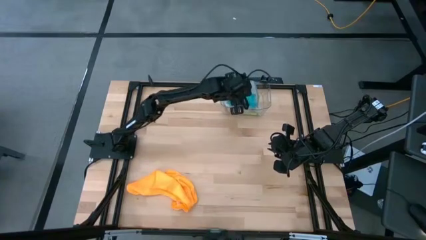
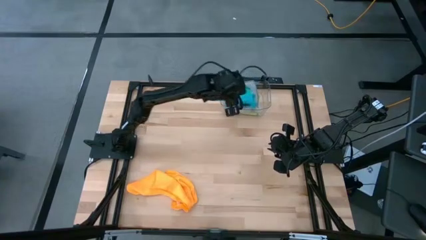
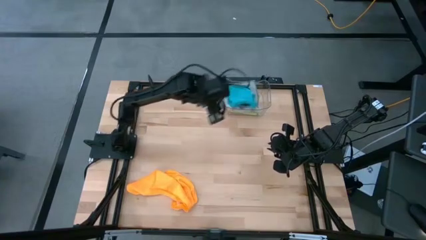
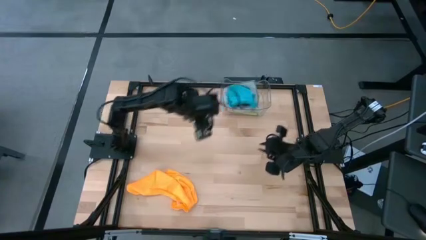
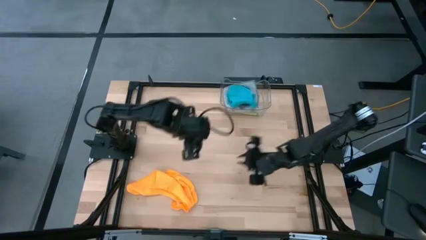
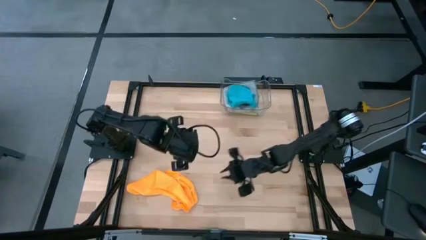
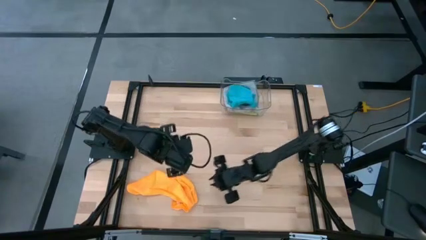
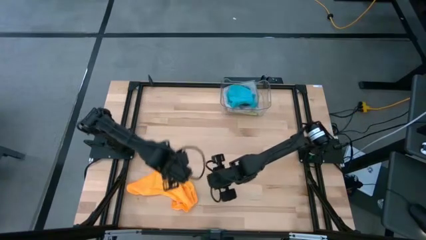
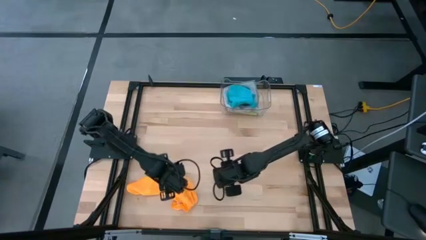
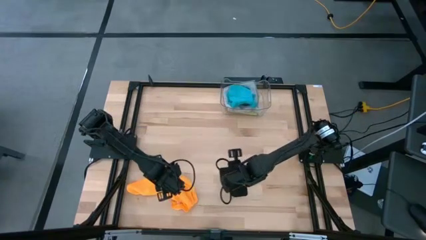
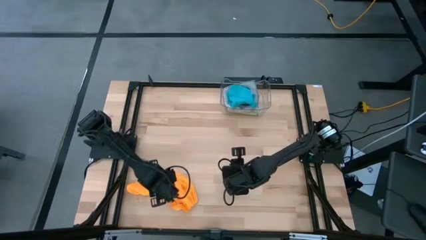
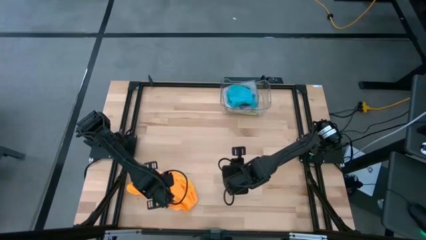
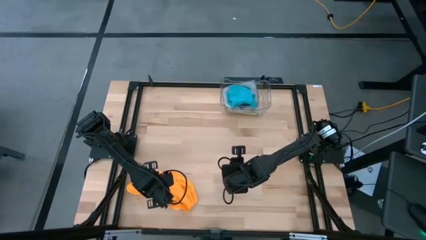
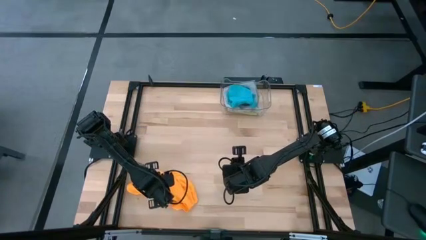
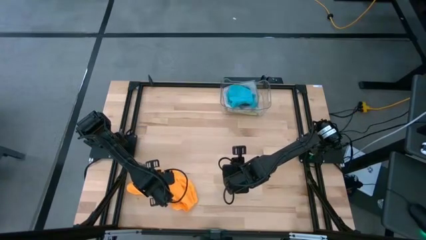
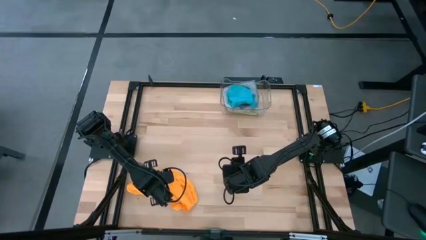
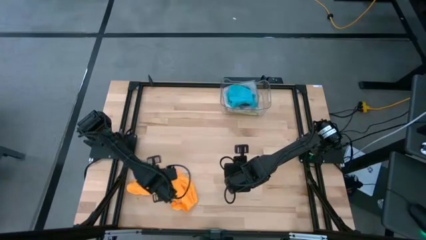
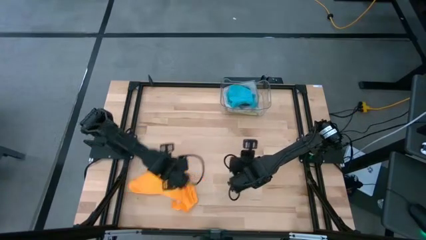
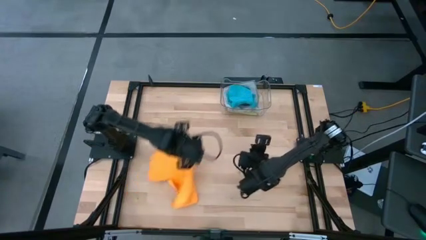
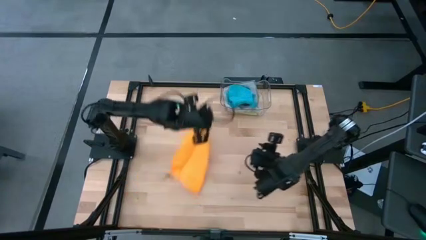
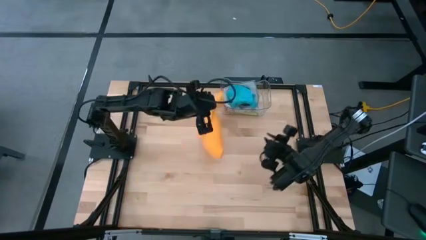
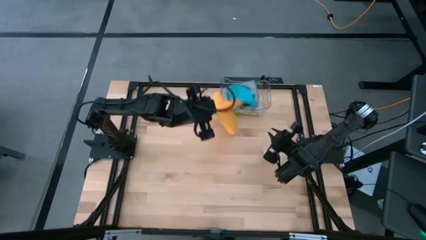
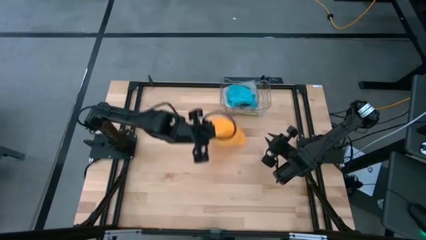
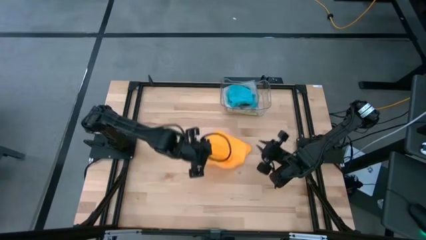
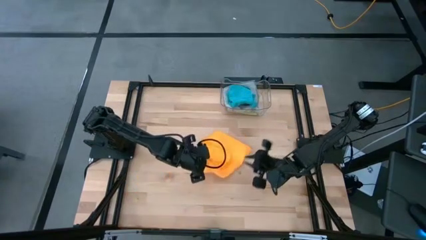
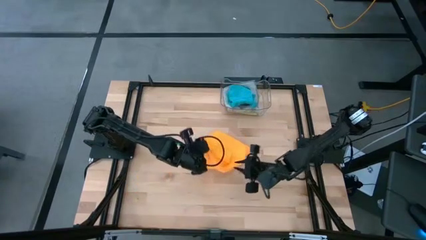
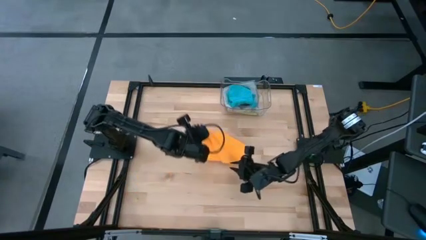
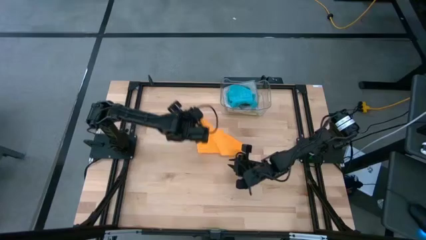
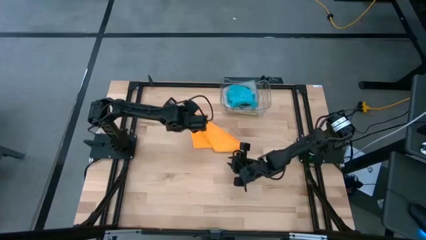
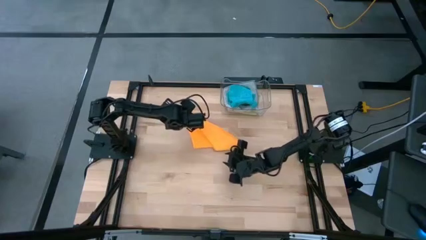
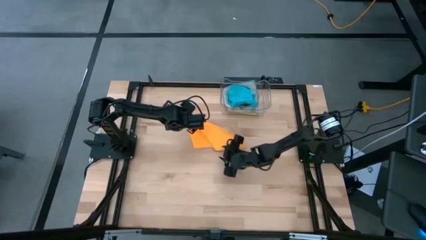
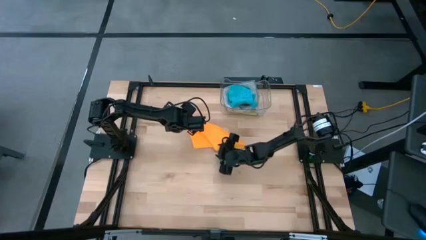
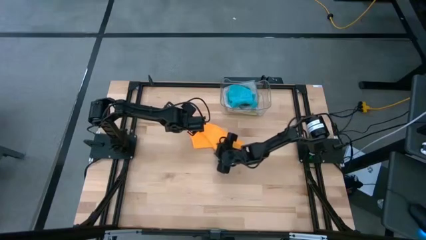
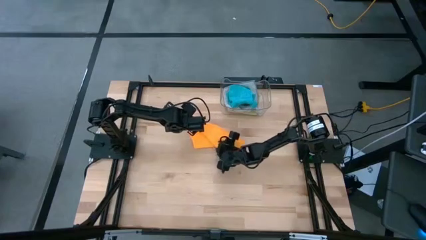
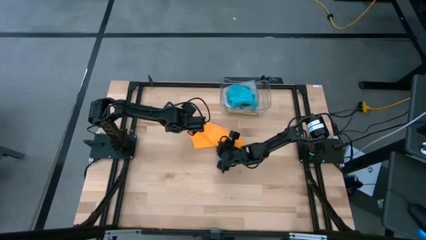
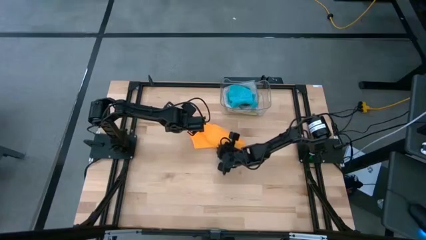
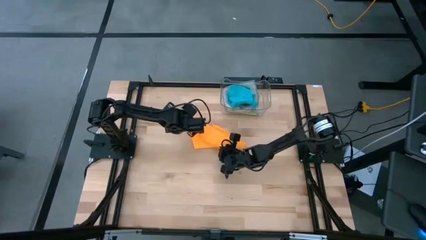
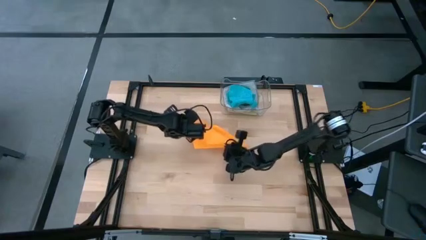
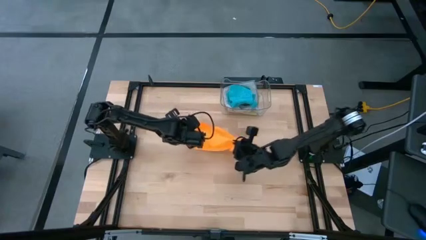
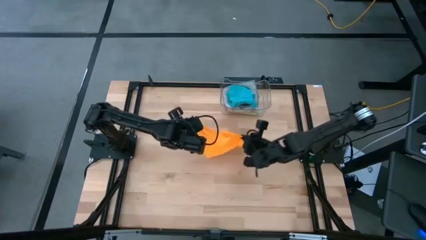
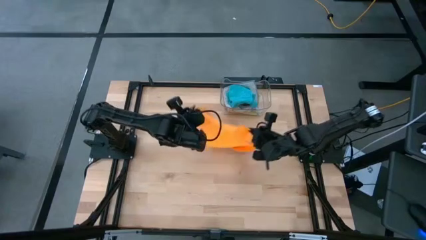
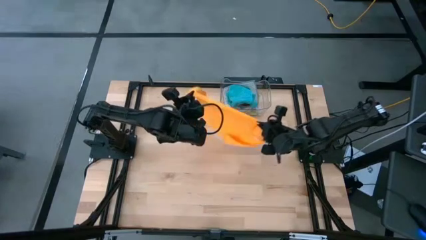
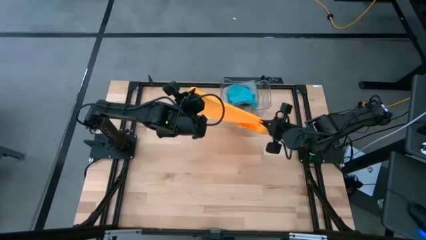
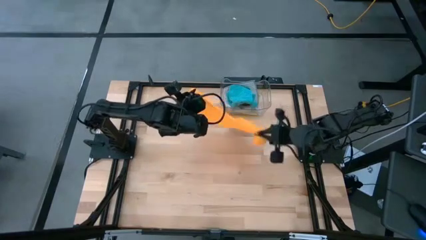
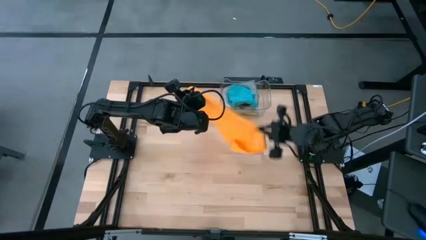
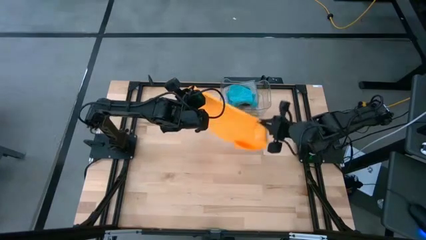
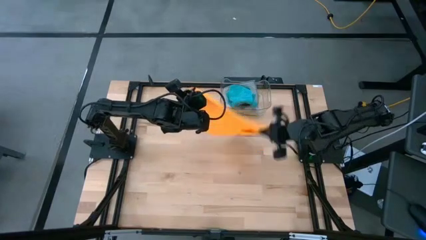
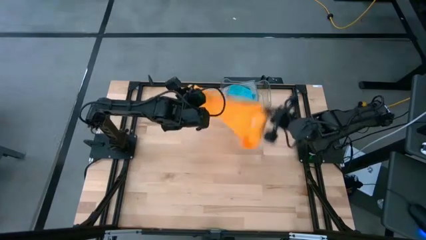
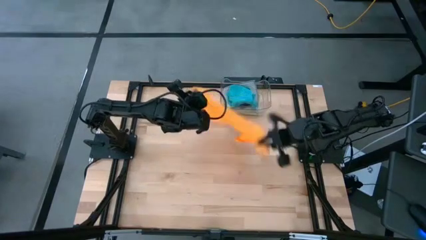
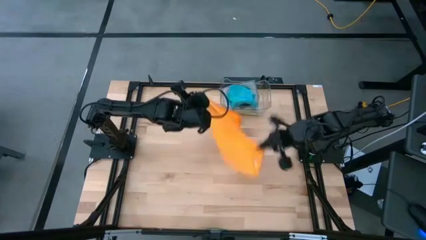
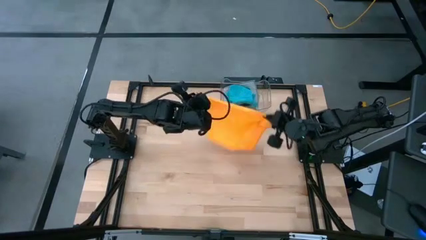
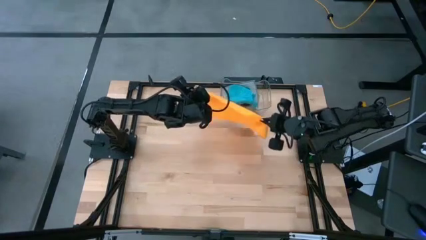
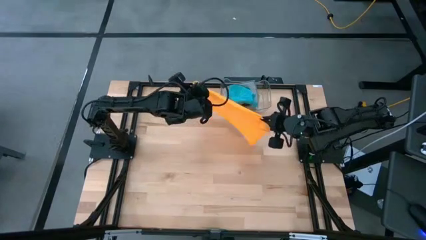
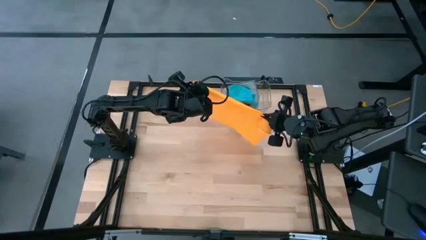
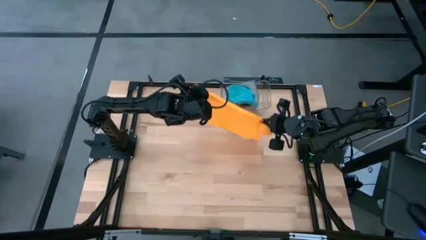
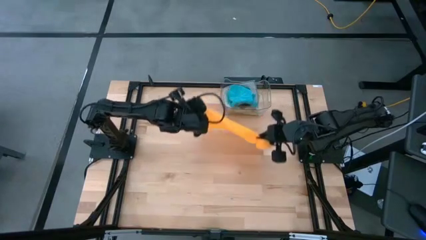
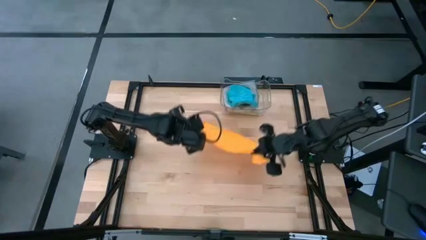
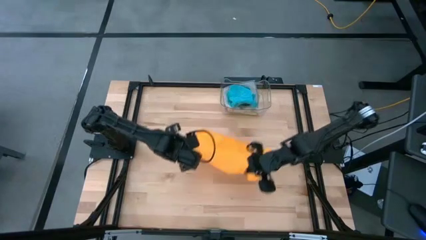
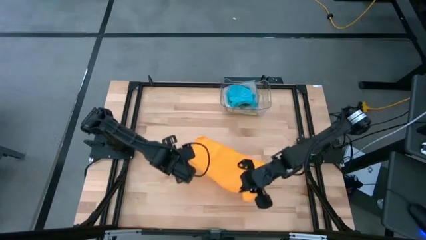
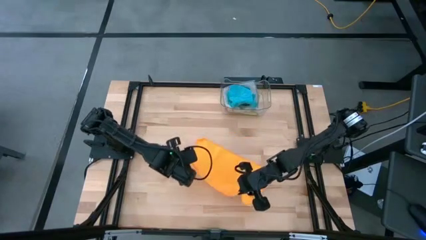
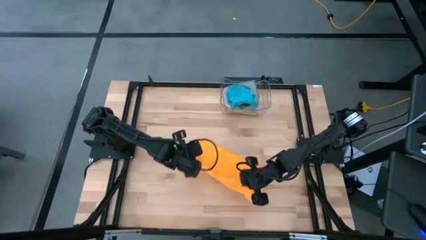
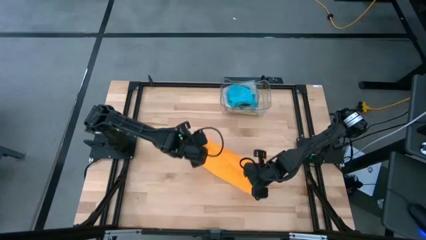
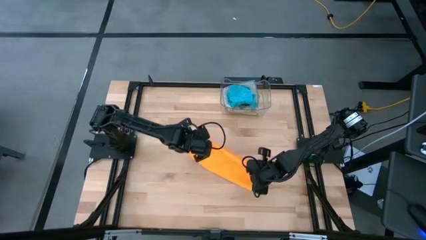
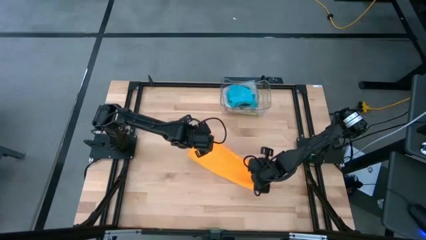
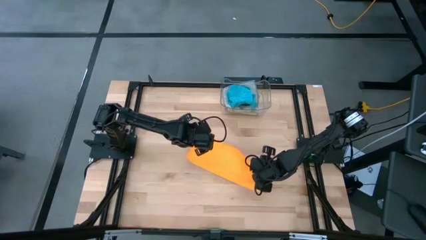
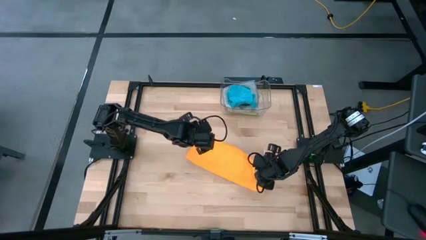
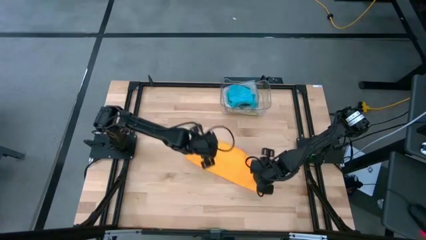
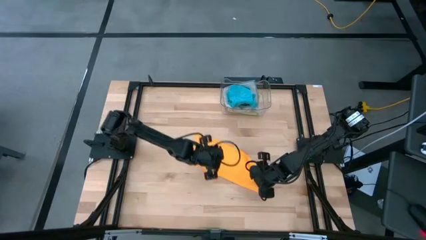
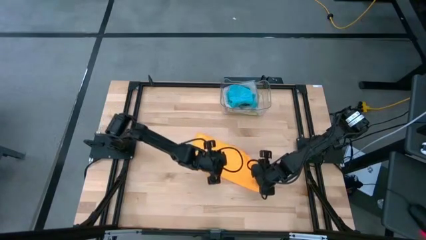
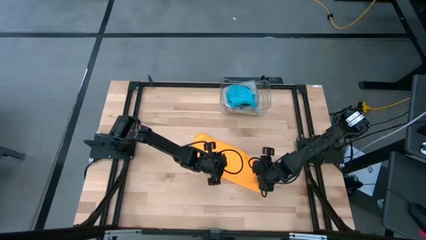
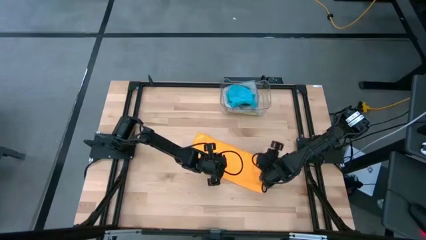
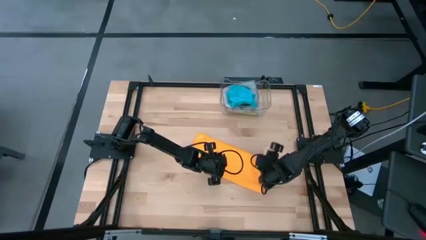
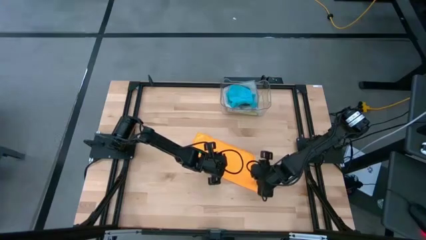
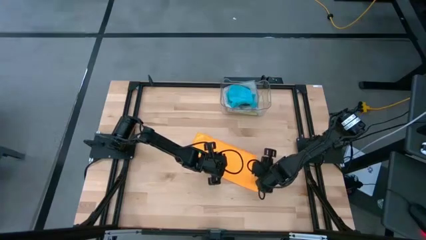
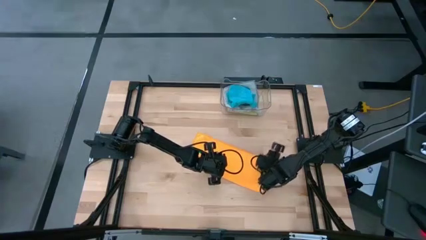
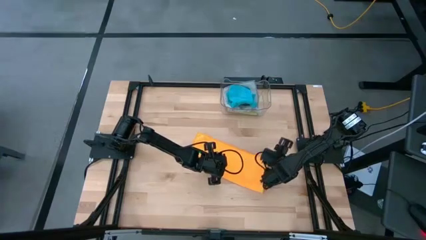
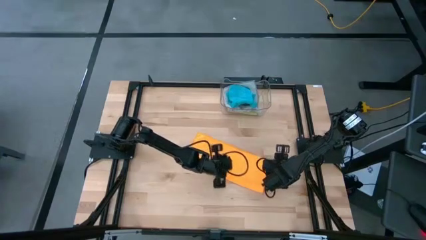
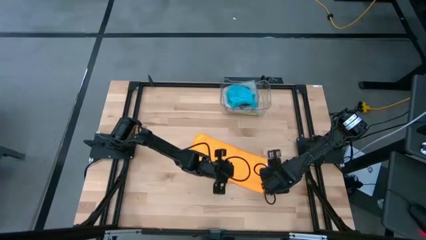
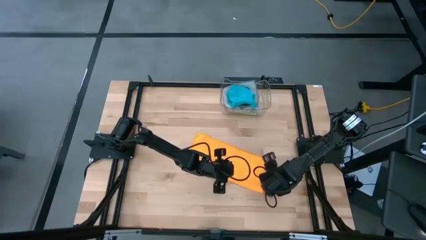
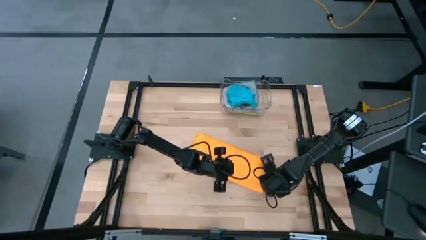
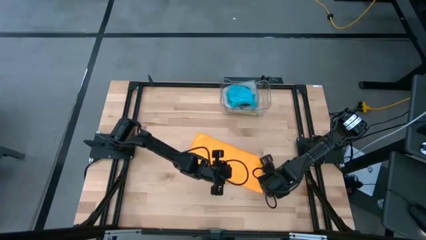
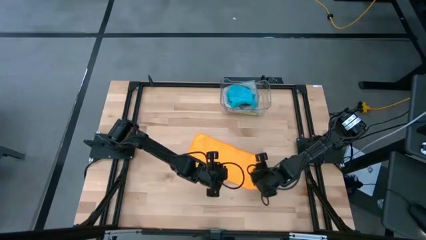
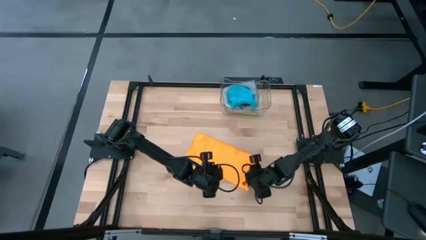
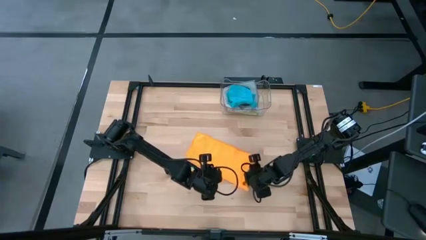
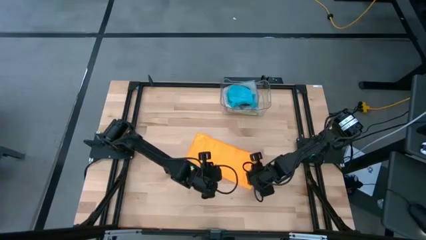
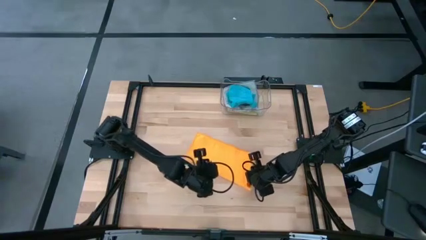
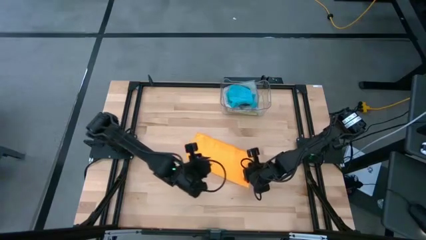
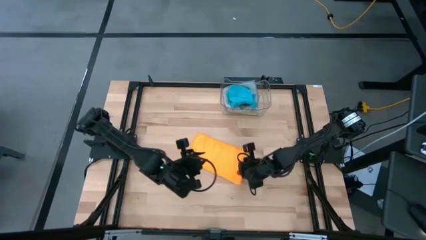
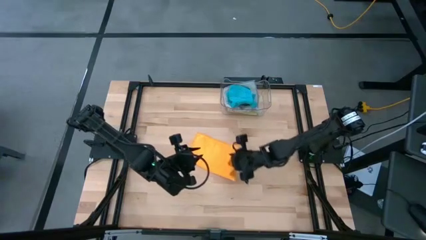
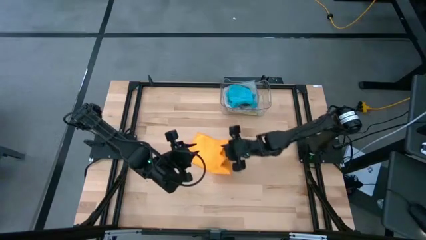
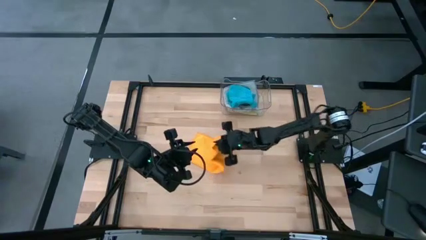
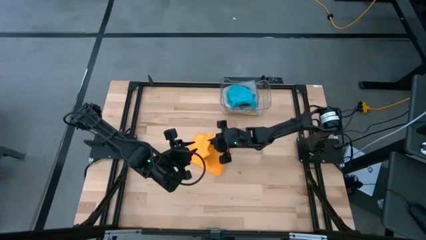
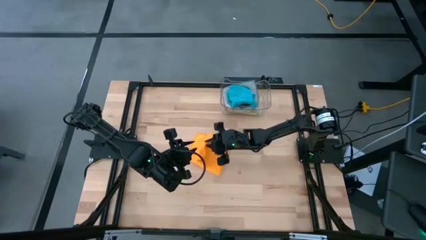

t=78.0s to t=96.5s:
Task: Fold microfiber towels
Fold the yellow microfiber towel
